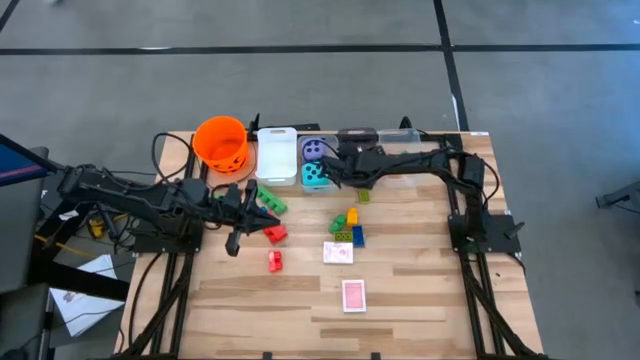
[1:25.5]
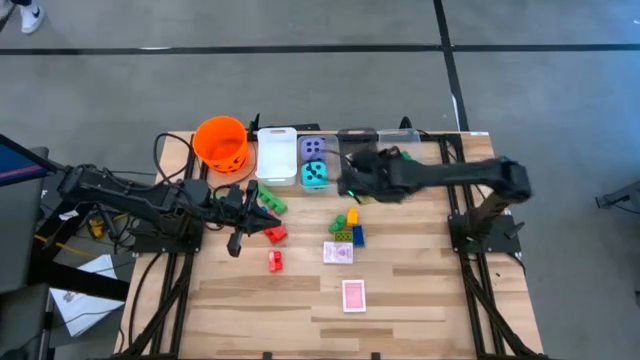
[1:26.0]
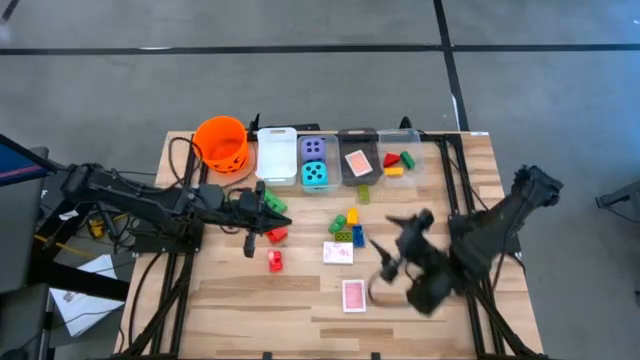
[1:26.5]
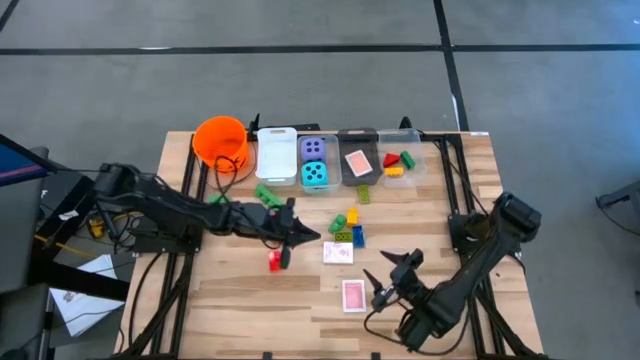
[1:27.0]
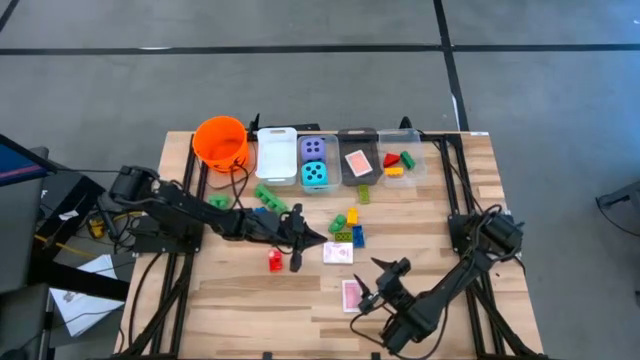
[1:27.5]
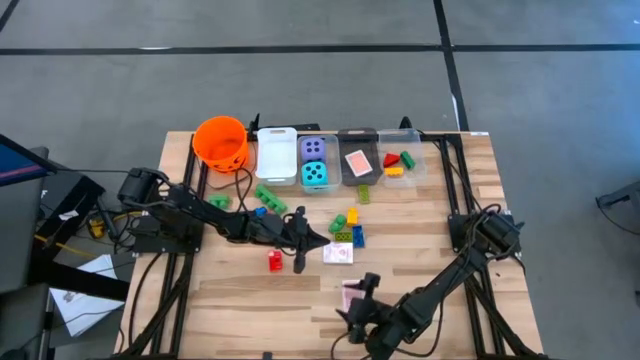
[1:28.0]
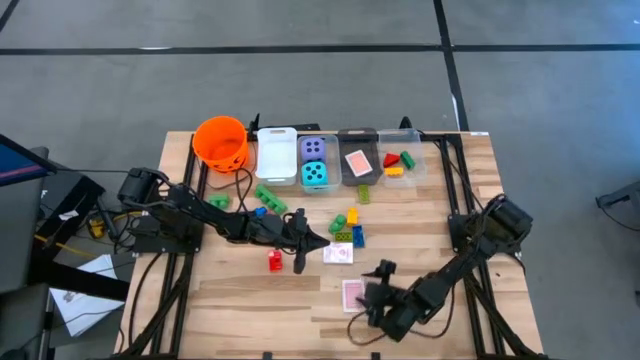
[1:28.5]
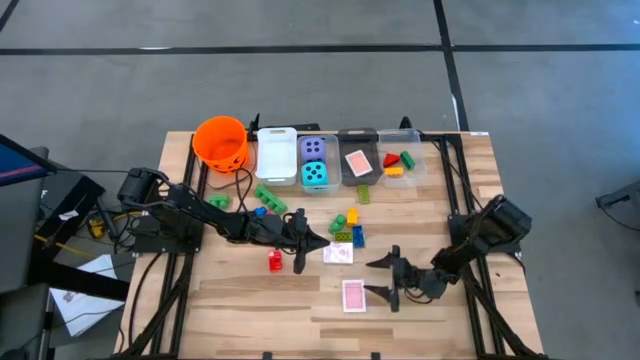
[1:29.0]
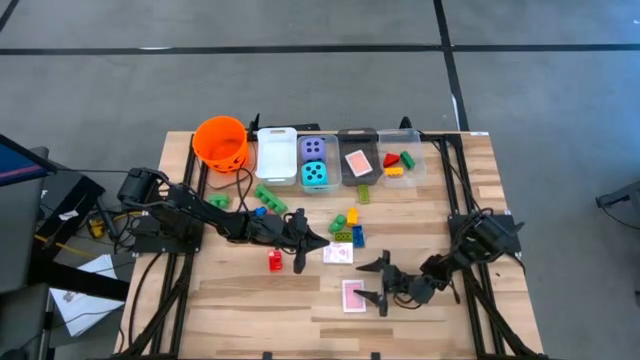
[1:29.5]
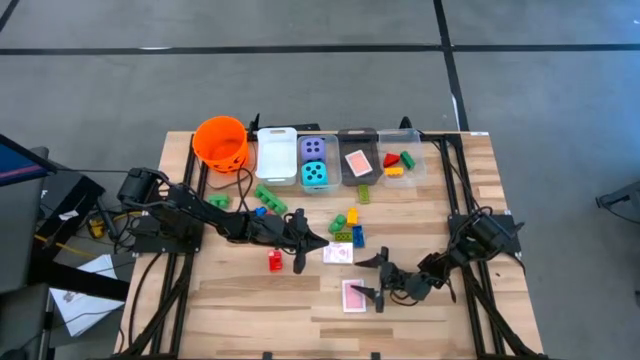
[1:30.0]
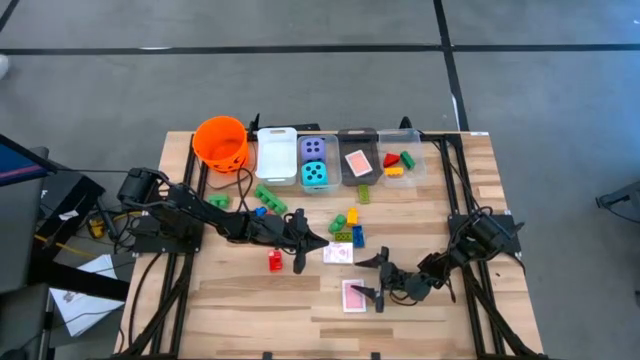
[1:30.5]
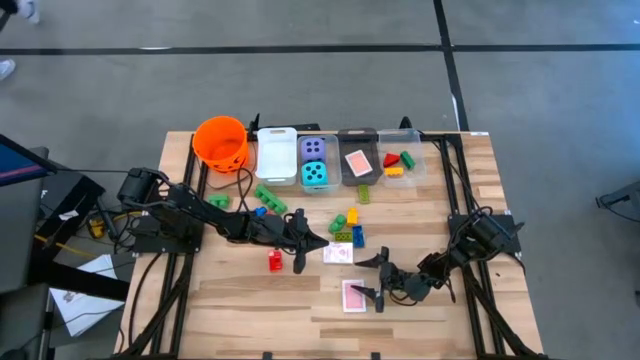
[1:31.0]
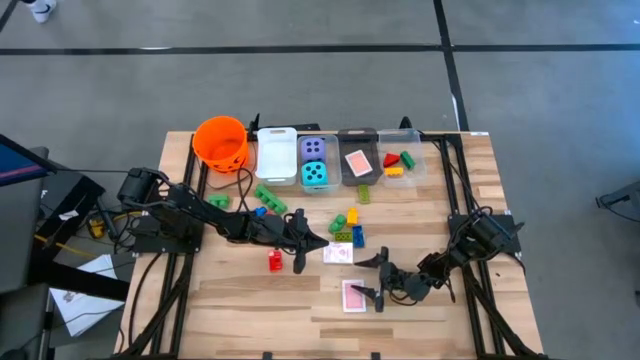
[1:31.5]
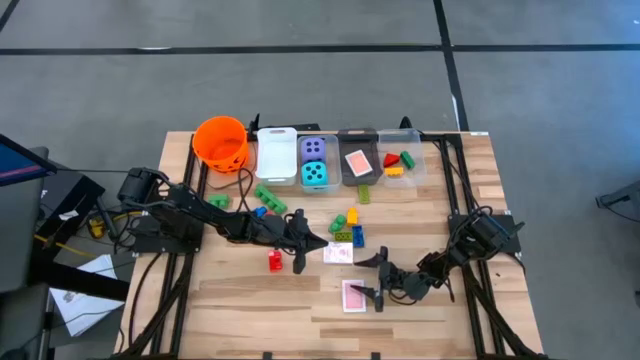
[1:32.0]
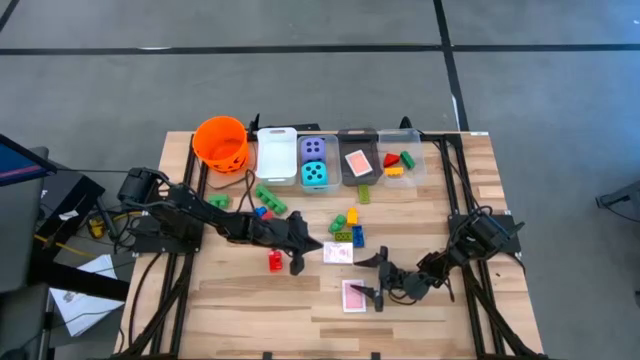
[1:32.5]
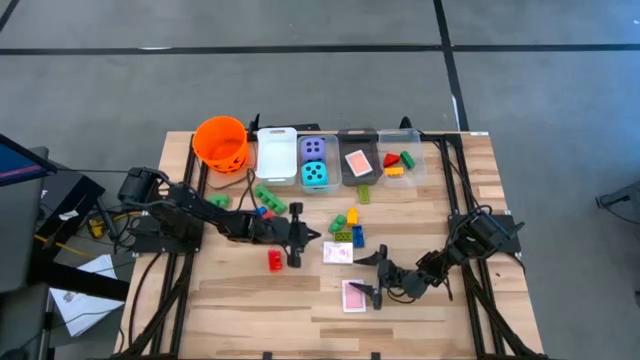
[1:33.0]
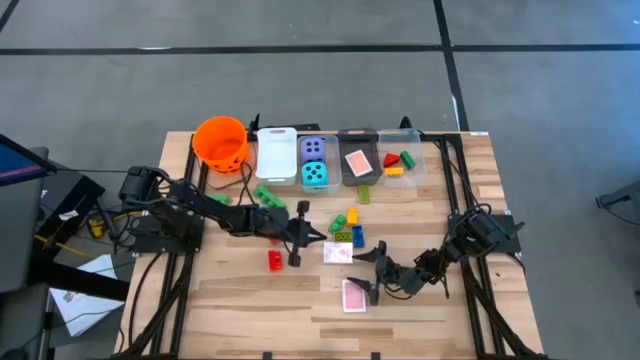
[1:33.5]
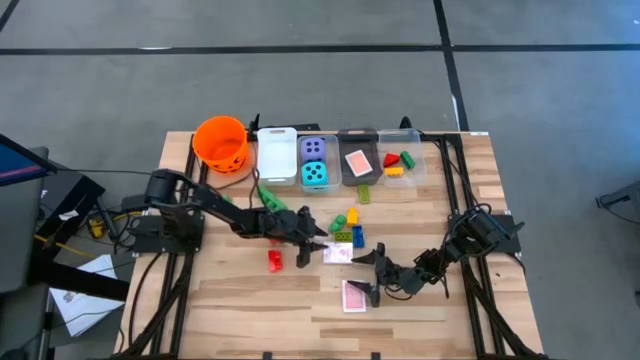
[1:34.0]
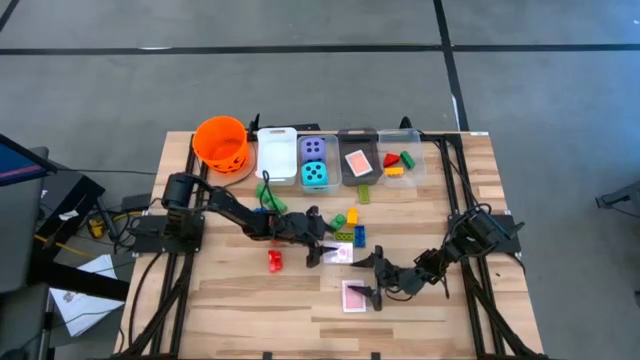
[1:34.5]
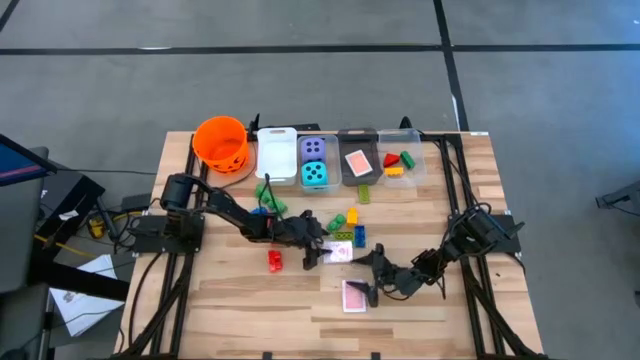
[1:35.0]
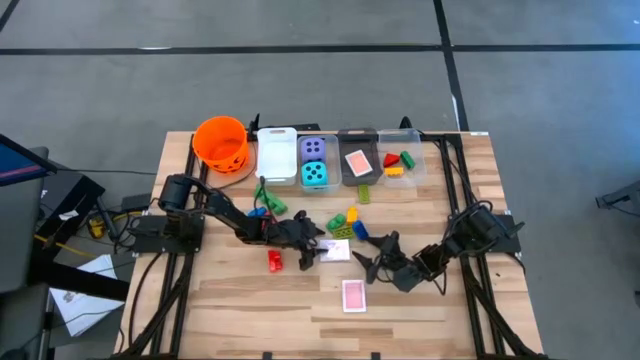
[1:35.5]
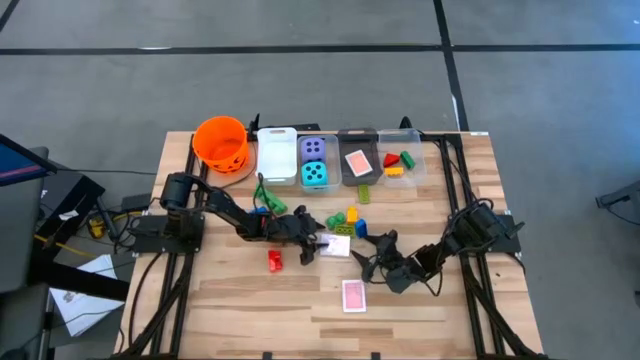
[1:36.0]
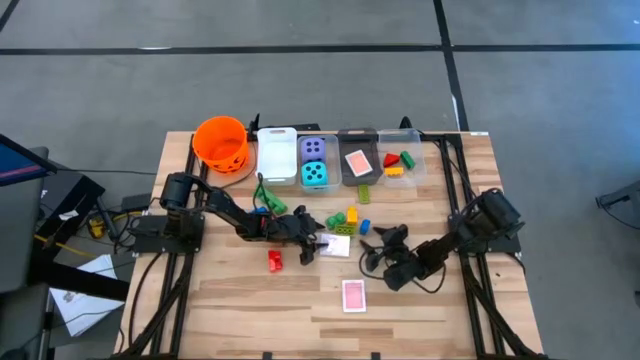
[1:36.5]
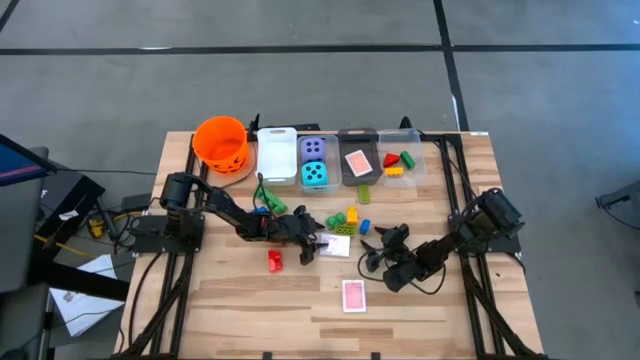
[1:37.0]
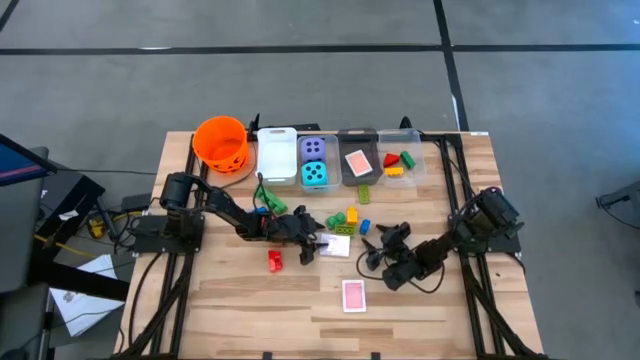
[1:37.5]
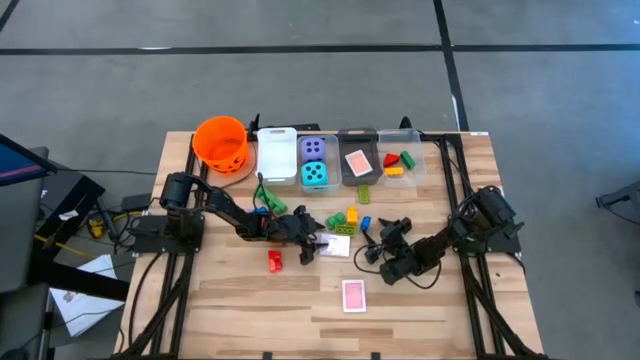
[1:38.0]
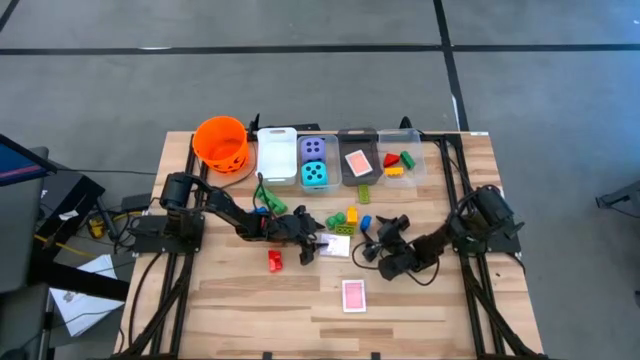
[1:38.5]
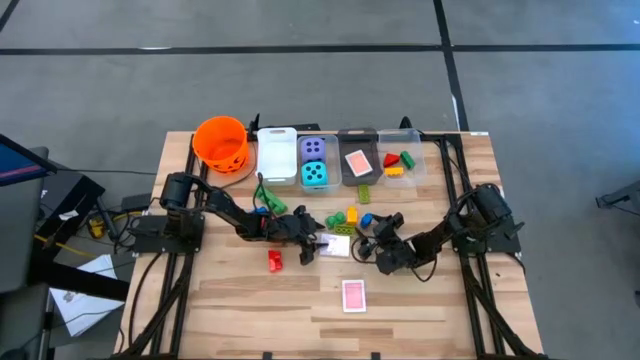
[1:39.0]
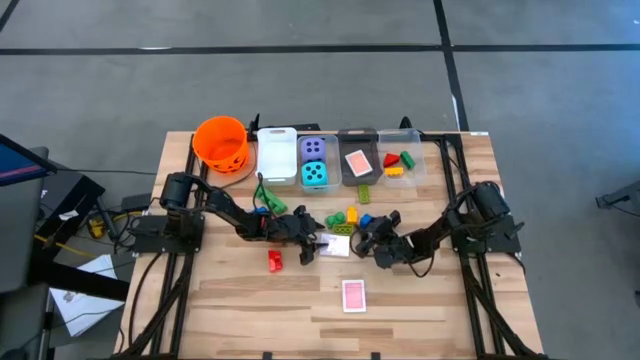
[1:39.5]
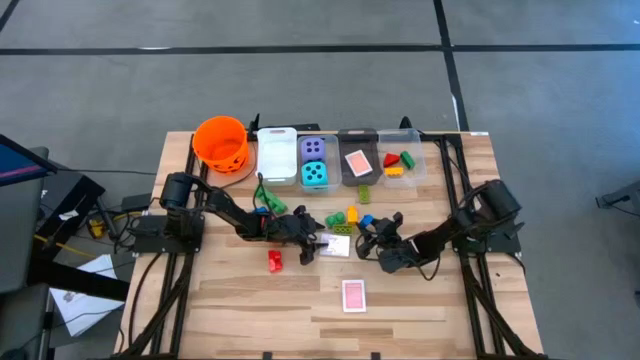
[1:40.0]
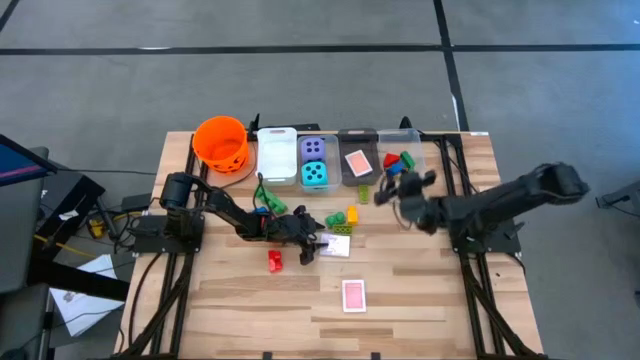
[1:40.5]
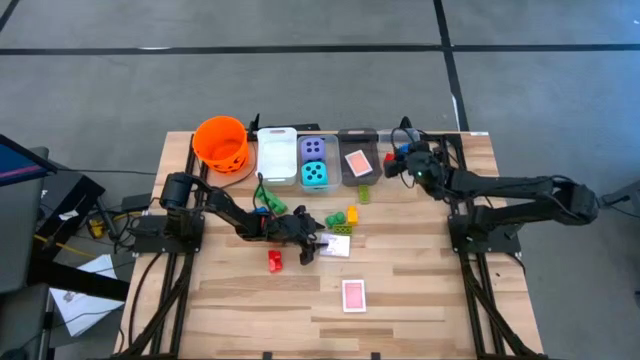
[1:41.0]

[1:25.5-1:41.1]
Task: Pick & Place Toys
Put the small blue game piece into the right transparent bin

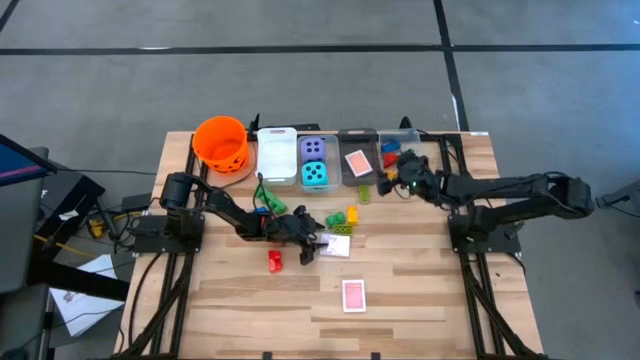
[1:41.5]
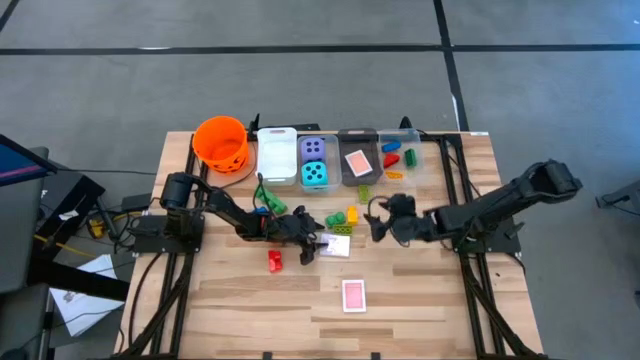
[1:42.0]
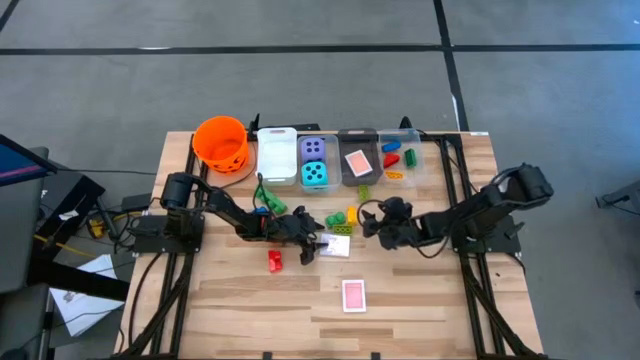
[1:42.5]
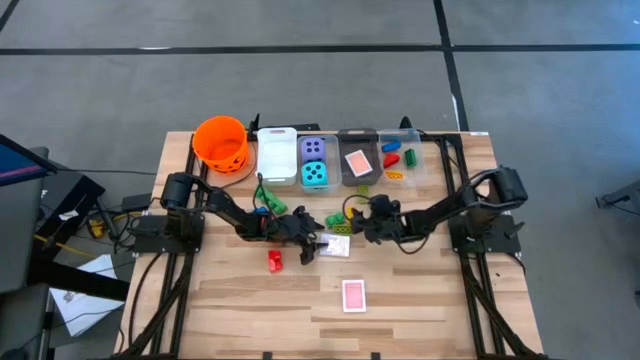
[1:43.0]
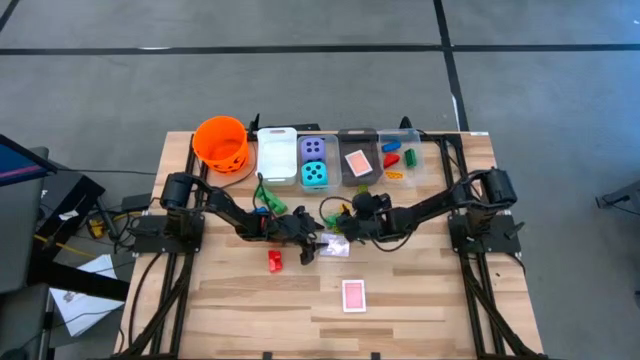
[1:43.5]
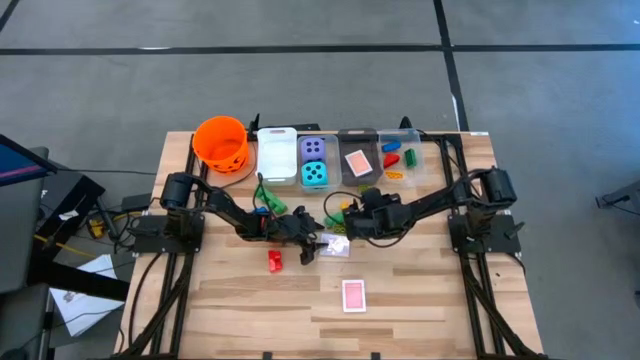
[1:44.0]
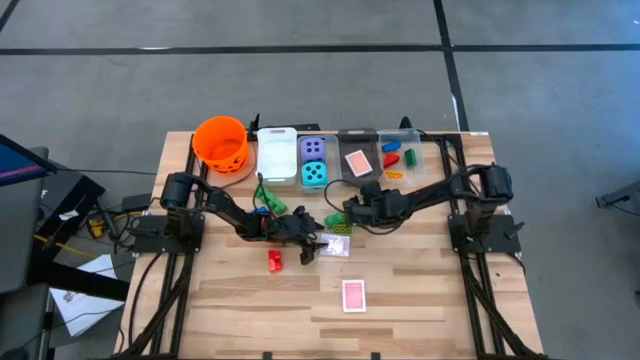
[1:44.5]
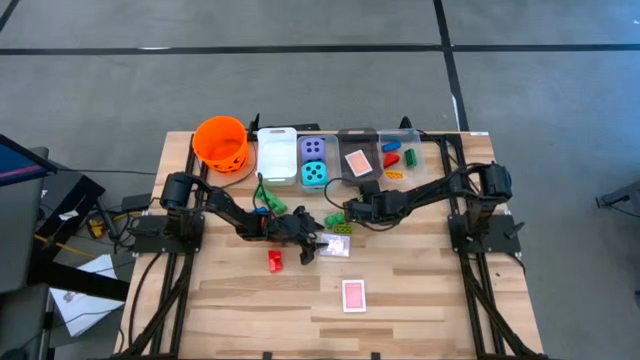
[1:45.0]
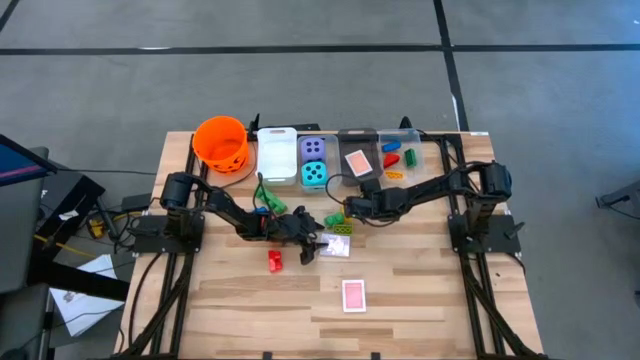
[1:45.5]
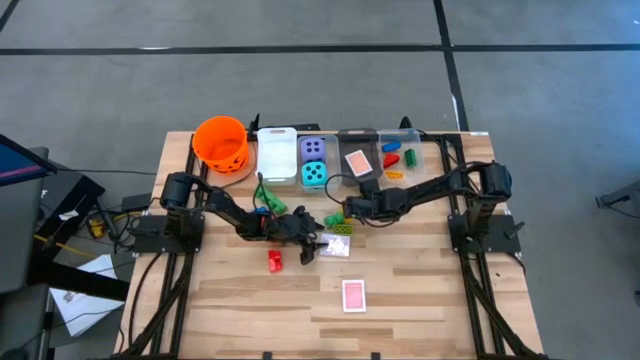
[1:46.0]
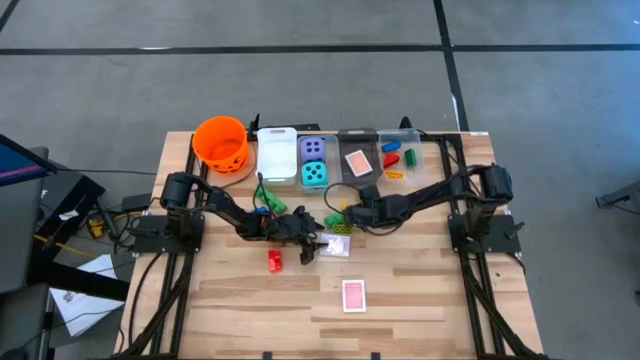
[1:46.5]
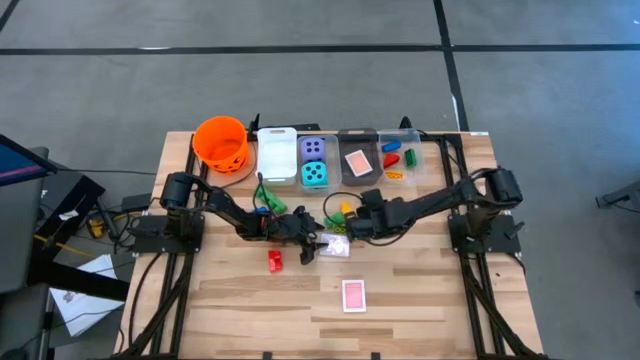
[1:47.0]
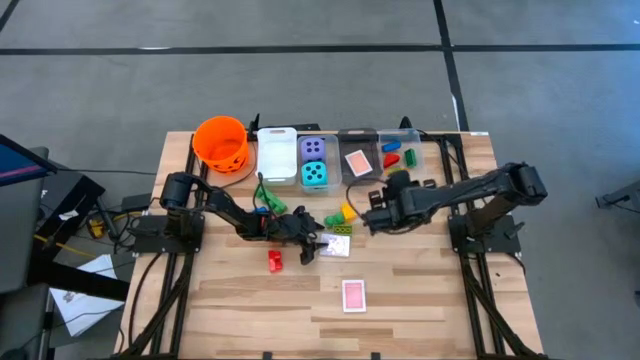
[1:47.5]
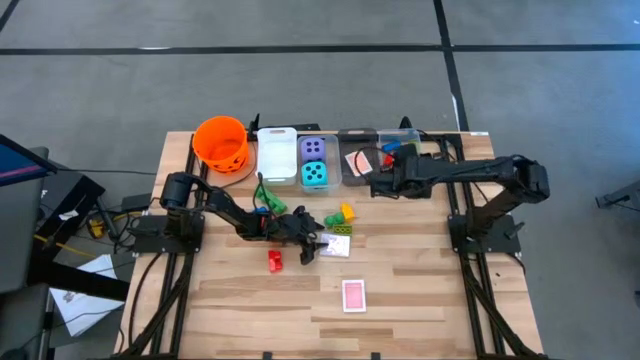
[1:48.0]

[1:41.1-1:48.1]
Put the small light green game piece into the right transparent bin
